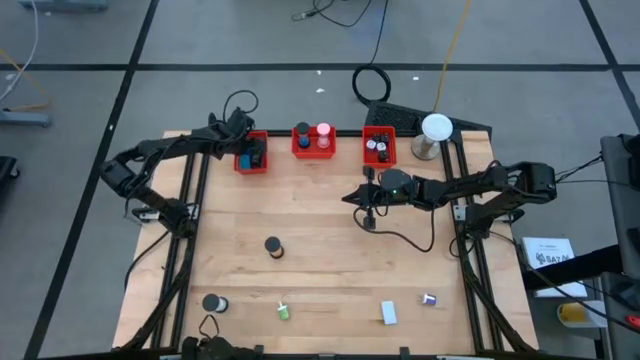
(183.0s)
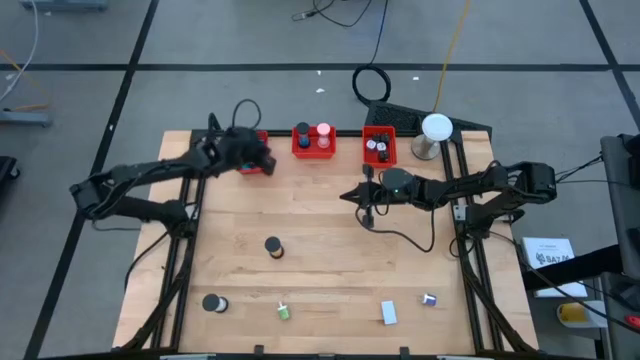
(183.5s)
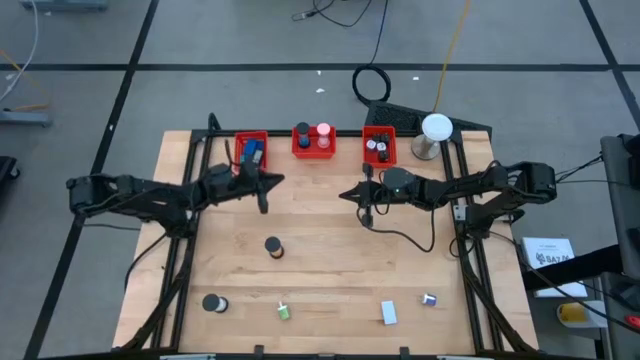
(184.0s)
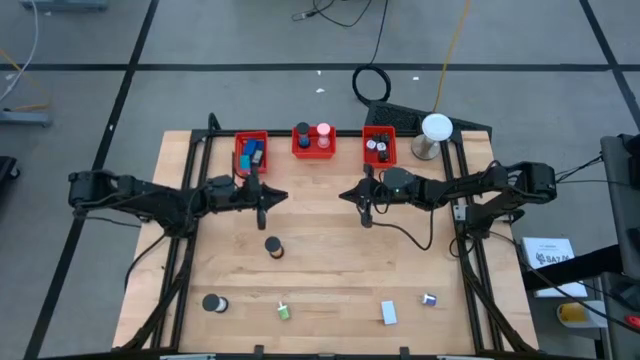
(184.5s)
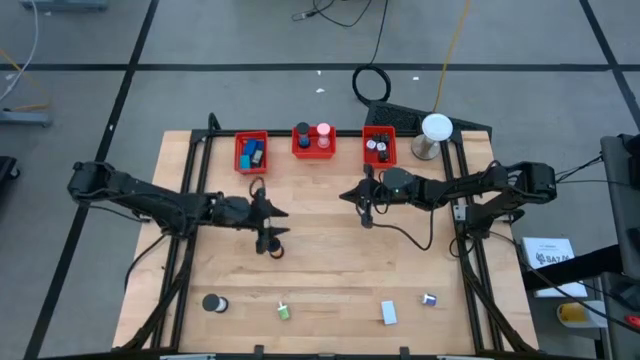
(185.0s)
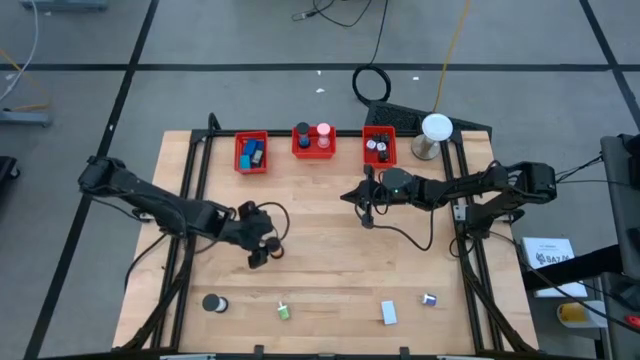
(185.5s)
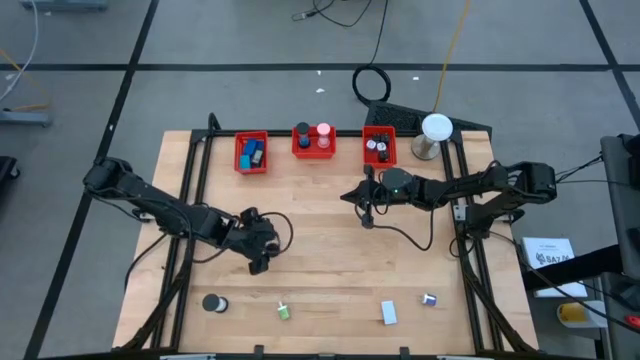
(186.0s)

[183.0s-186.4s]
Task: Pick & Place Office items
Put the light orange hourglass into the middle orange basket

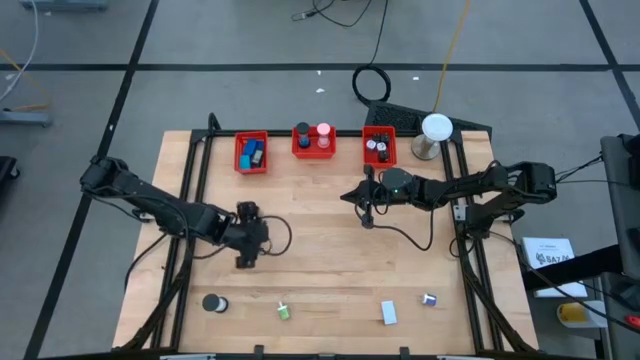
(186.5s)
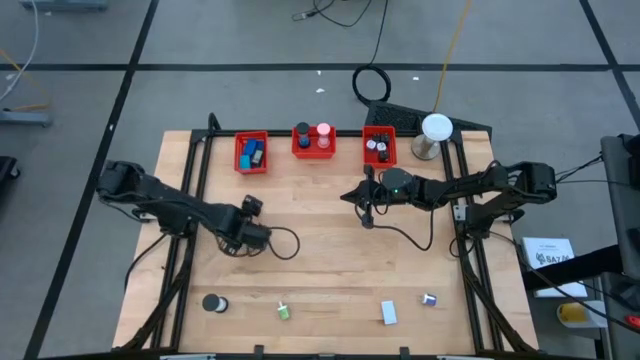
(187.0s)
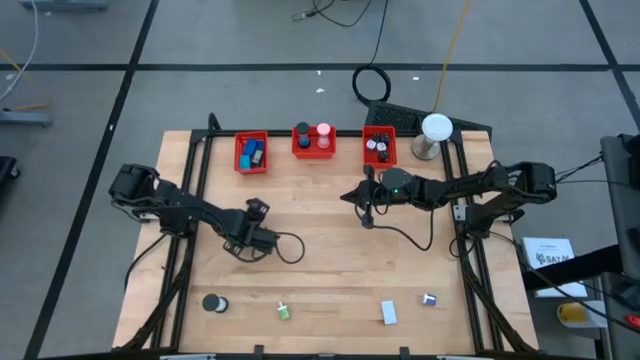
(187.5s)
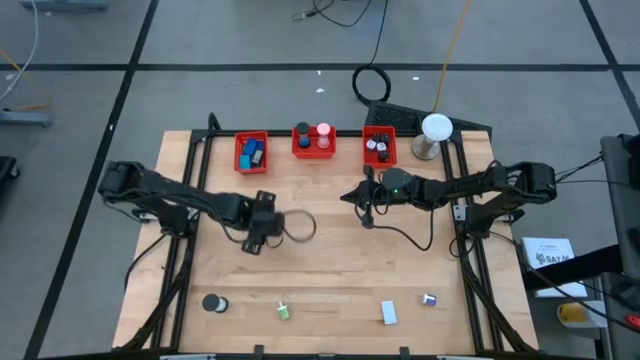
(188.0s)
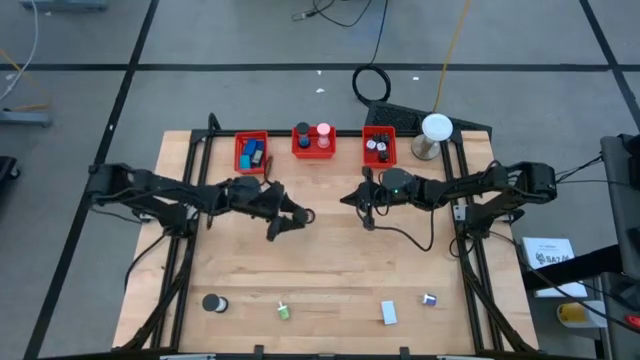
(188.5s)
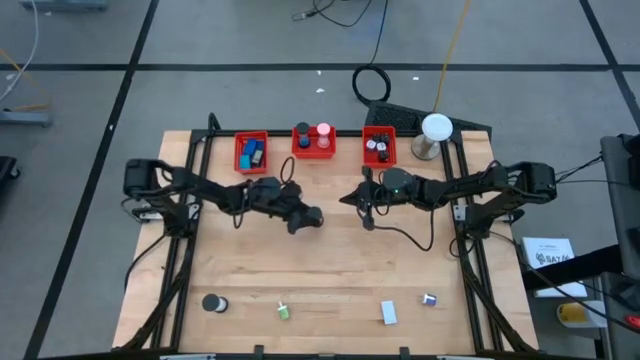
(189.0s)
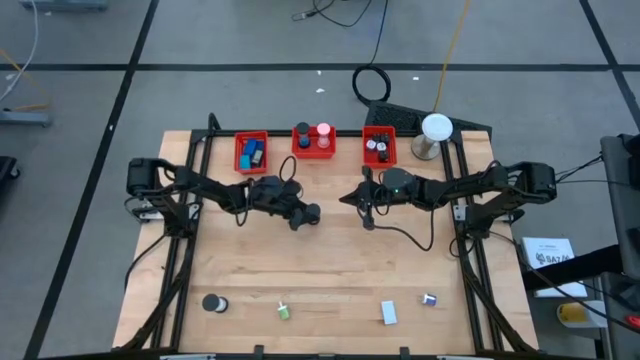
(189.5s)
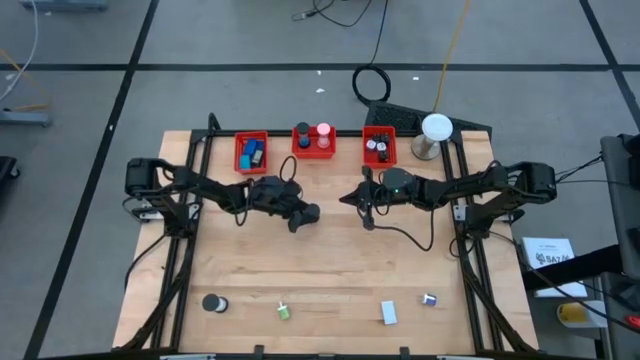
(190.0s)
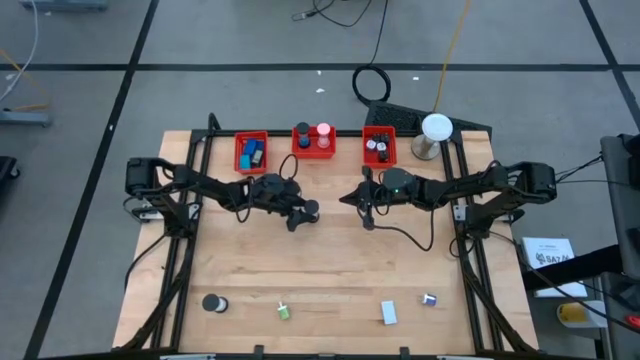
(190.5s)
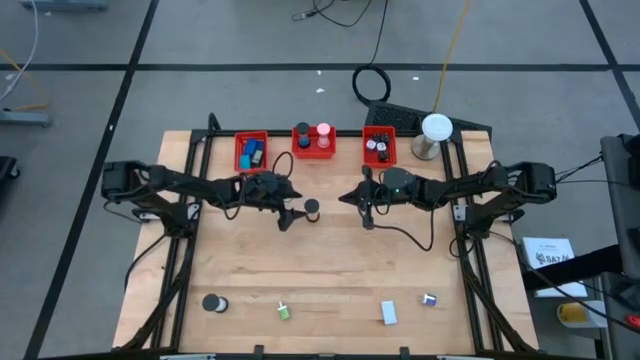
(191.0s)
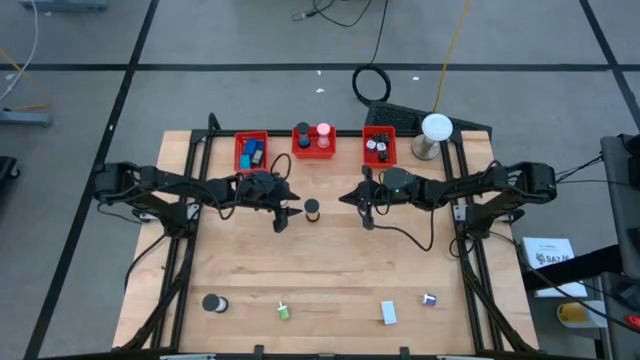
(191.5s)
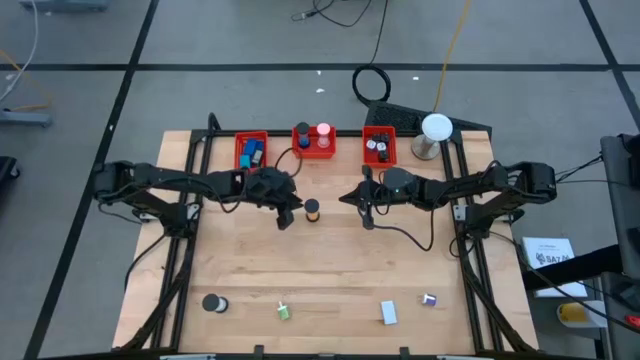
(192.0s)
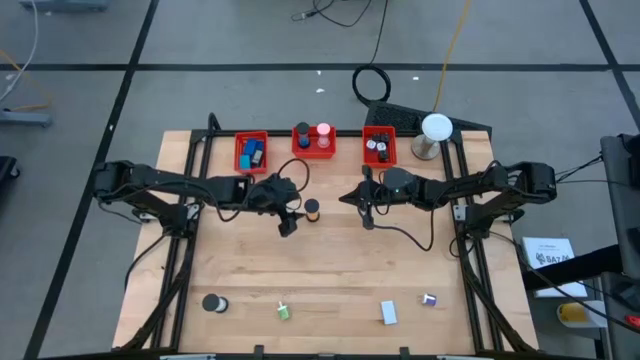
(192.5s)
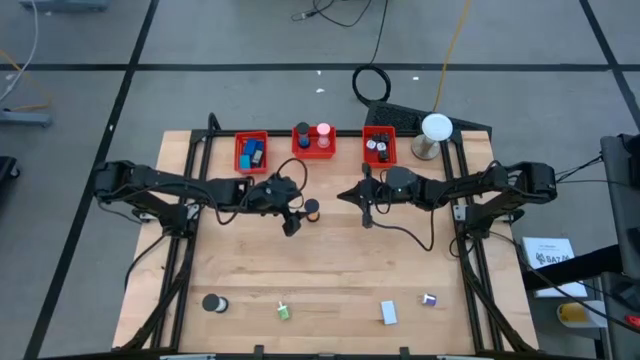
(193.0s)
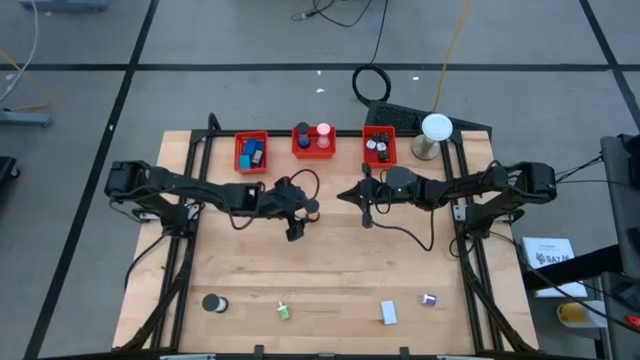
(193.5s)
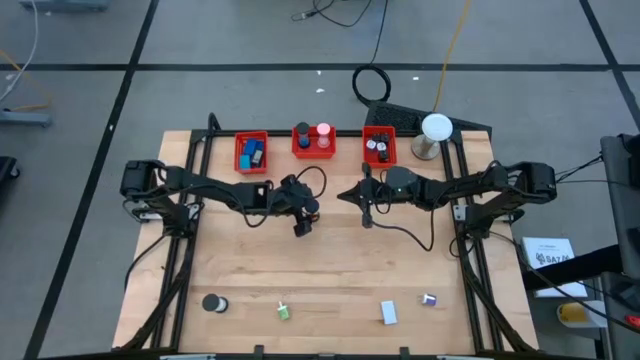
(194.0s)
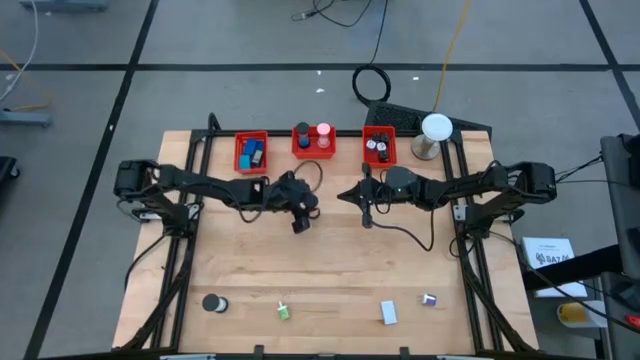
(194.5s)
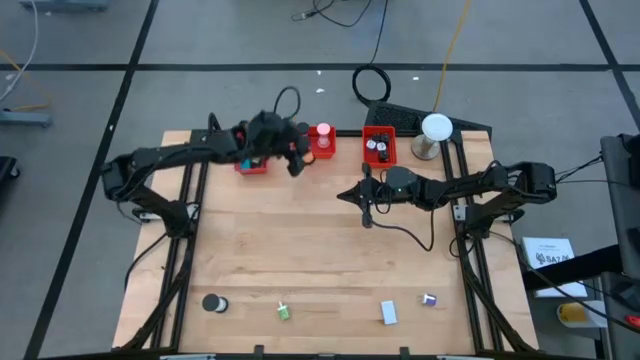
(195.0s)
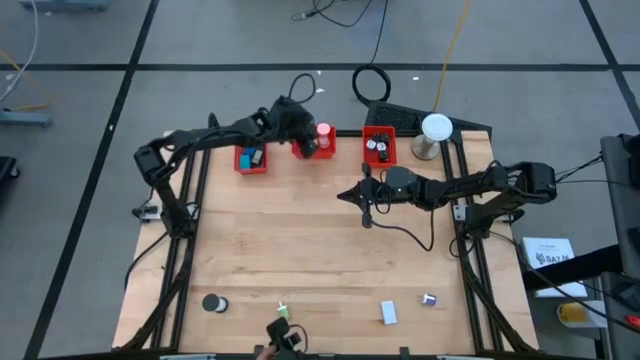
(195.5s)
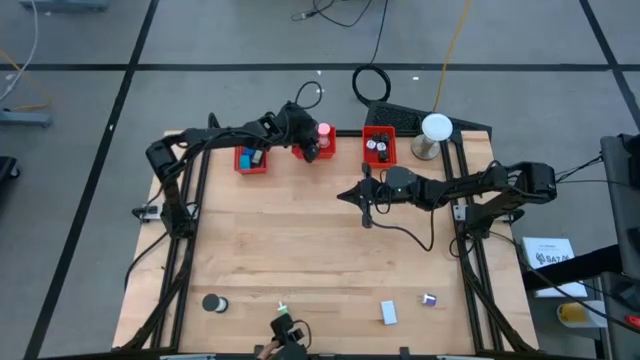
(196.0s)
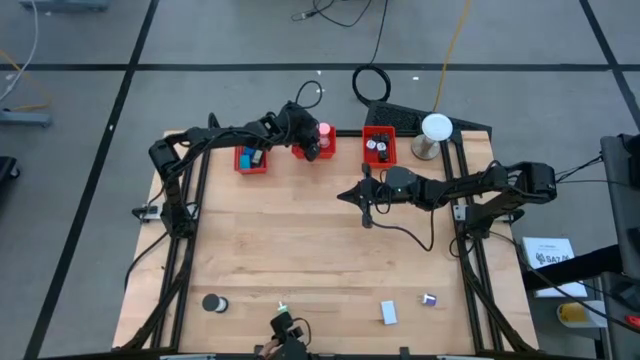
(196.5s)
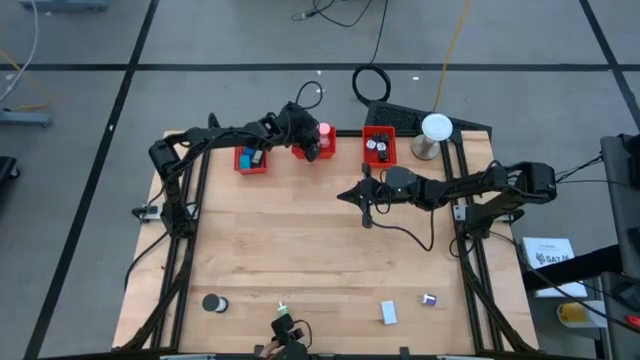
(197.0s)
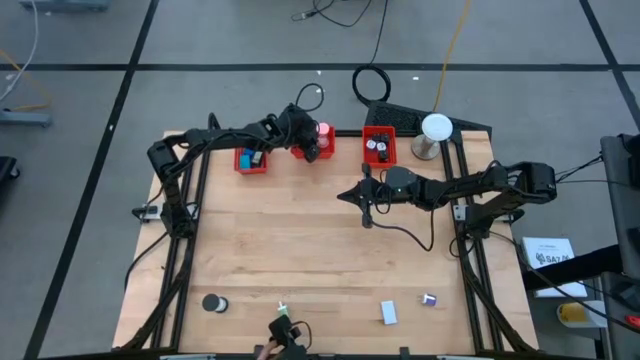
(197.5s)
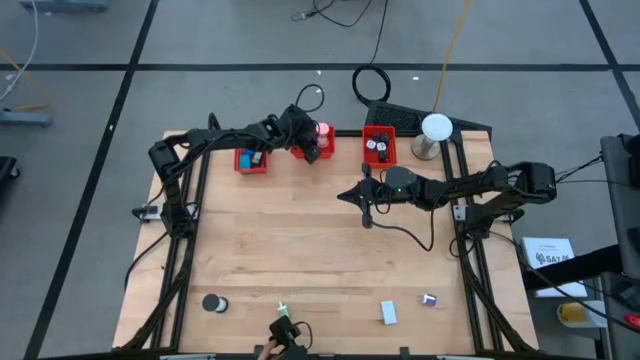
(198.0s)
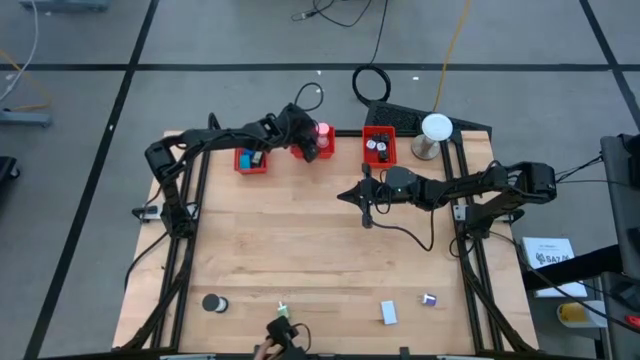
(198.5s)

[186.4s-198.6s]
Put the light orange hourglass into the middle orange basket

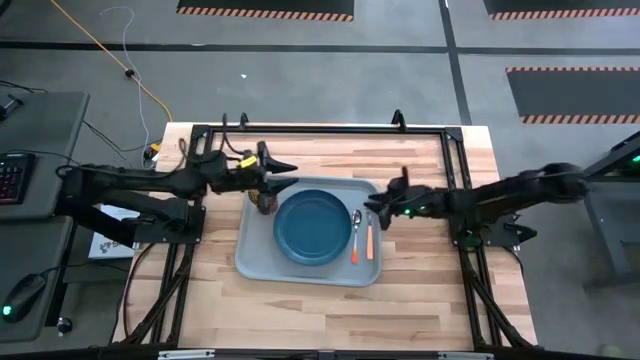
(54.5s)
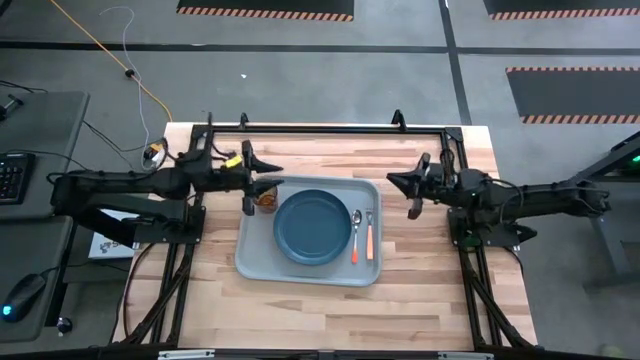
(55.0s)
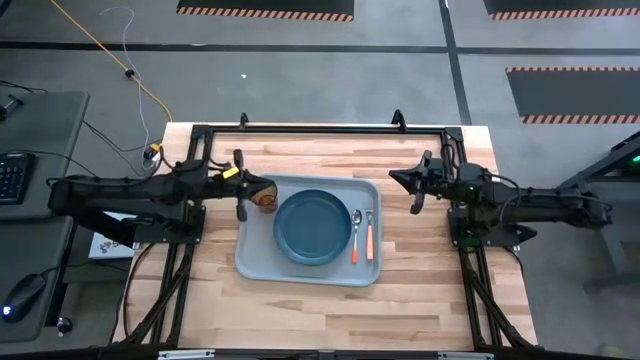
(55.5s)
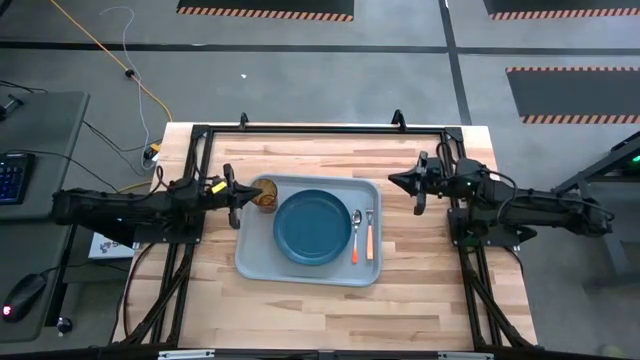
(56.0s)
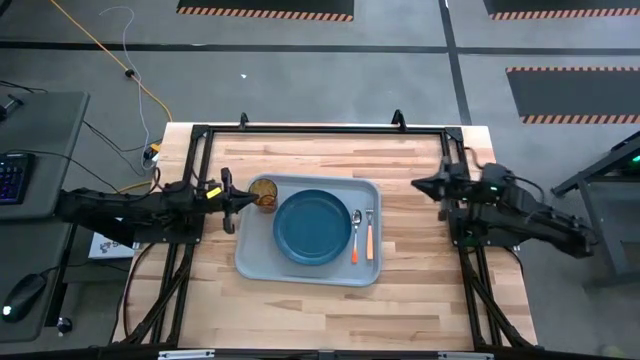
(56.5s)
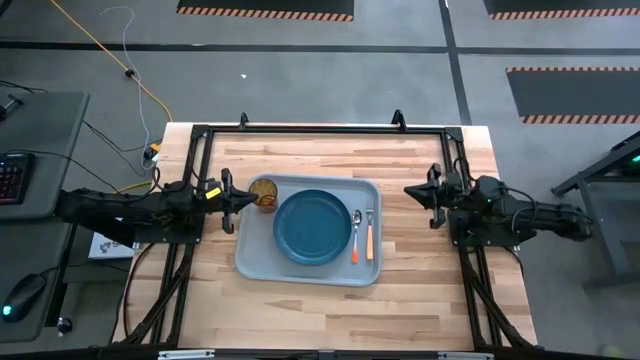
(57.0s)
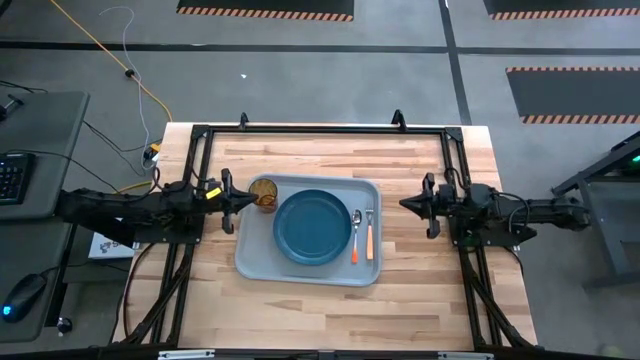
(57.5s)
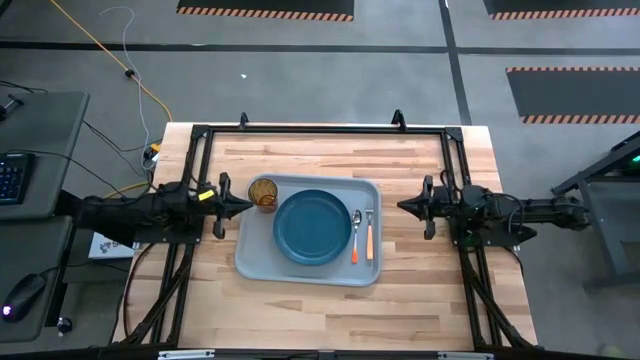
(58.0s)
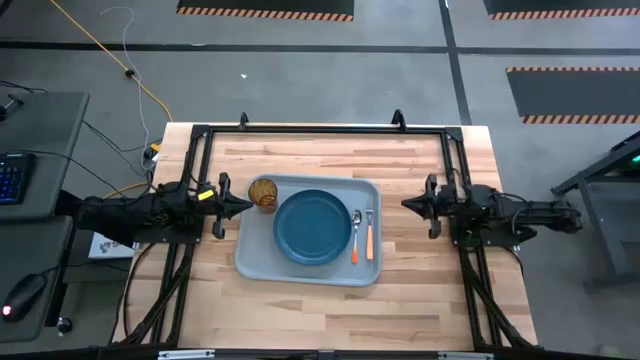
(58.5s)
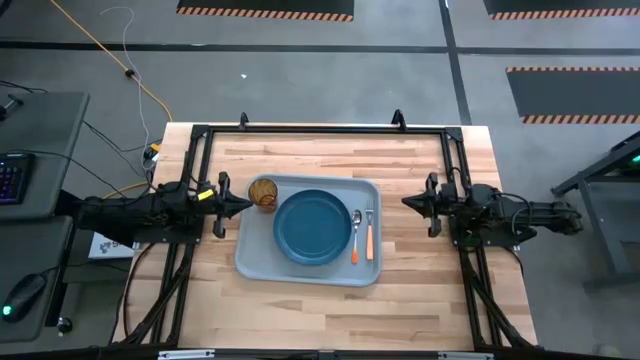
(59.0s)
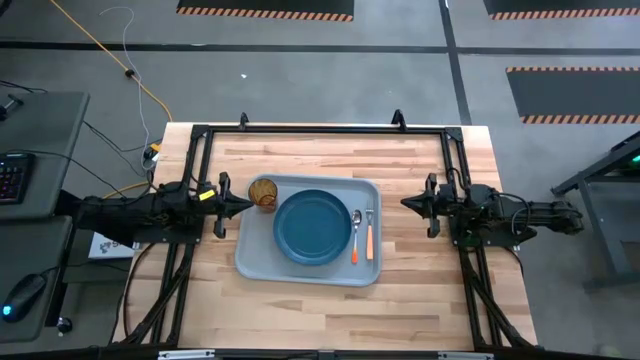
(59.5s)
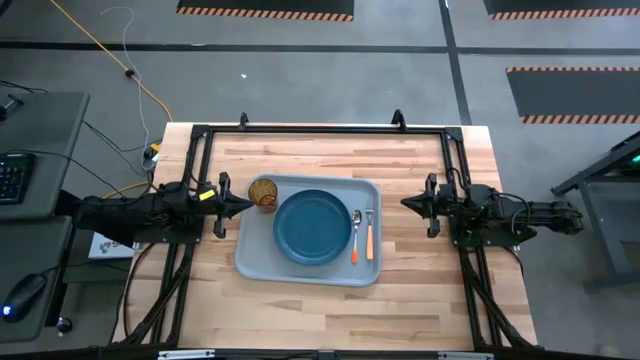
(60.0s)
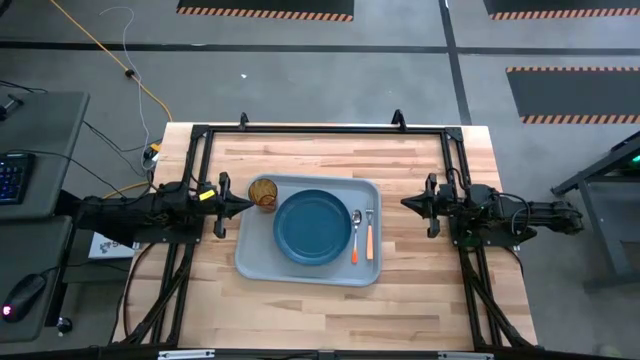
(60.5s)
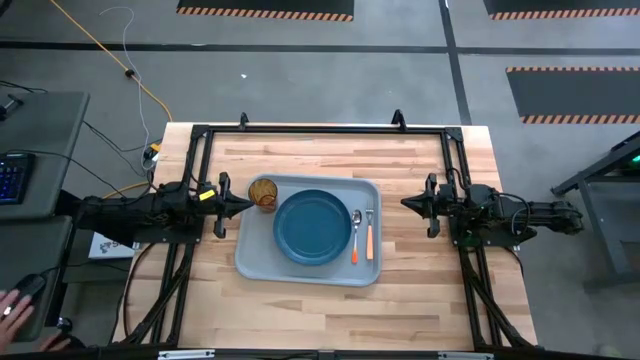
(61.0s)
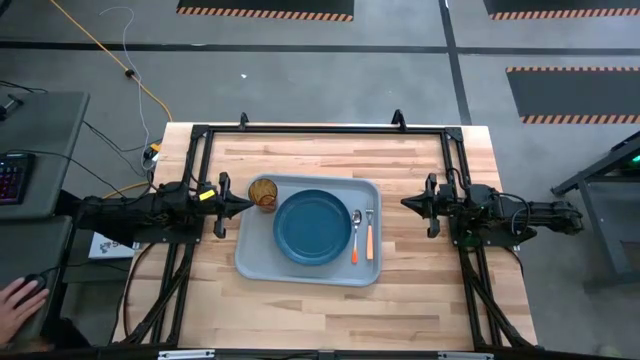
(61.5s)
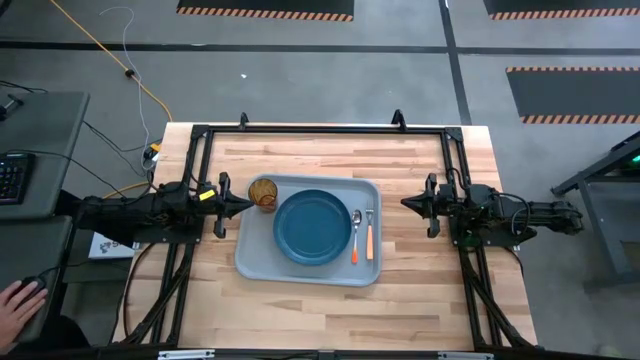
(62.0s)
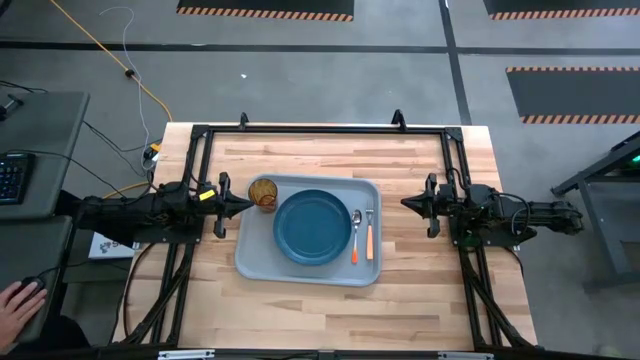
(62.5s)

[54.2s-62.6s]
Task: Pick and place plate/cup/fork/spoon on tray
Return to Home Position
